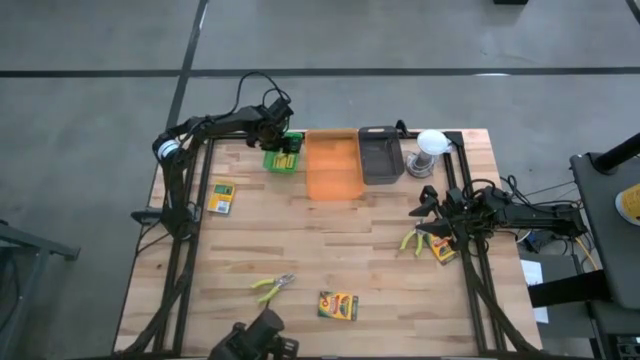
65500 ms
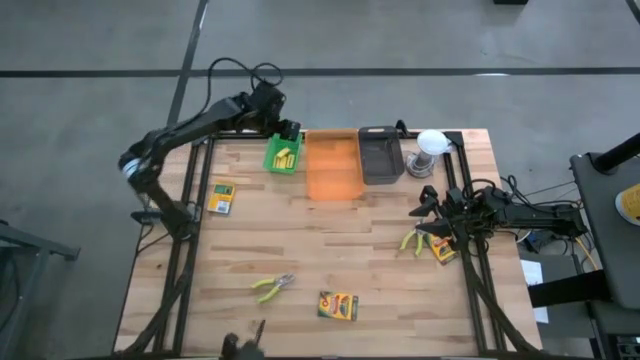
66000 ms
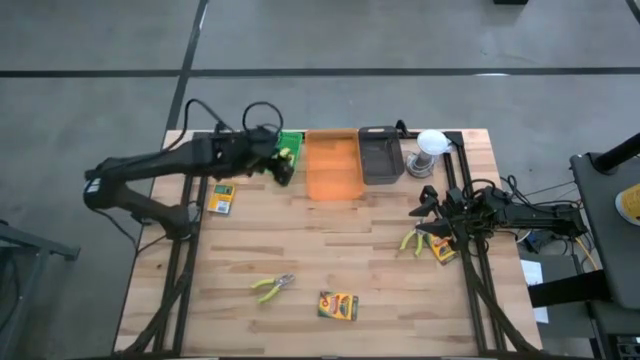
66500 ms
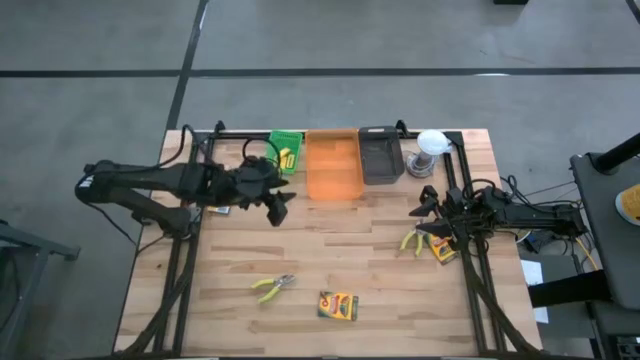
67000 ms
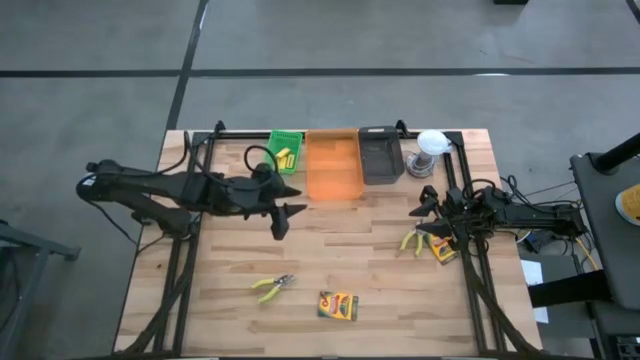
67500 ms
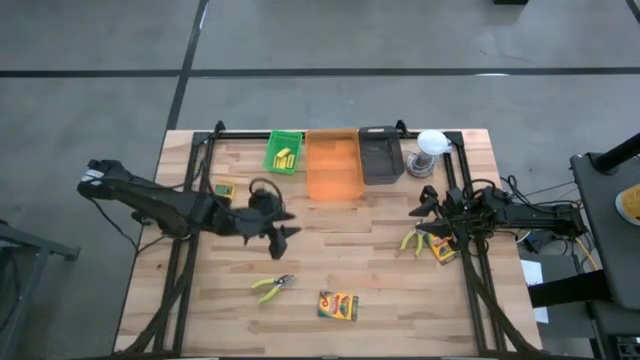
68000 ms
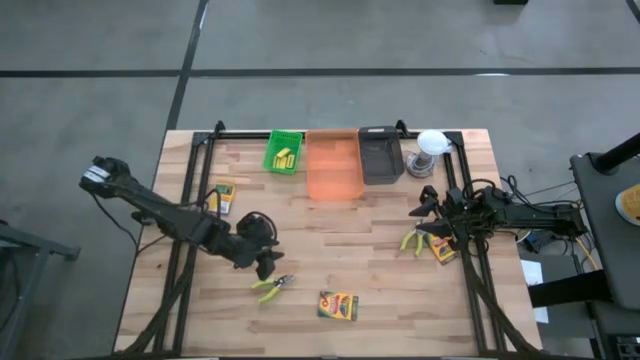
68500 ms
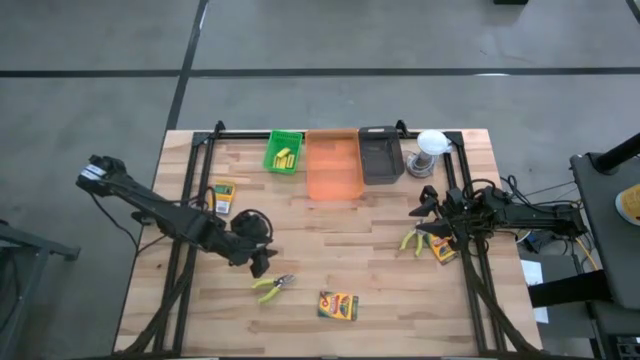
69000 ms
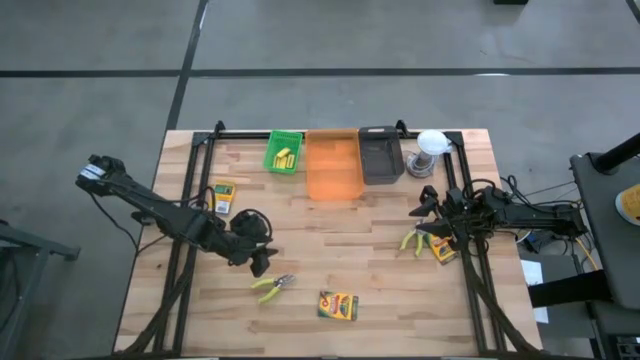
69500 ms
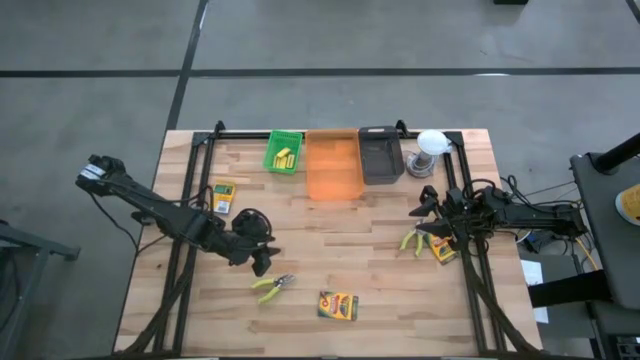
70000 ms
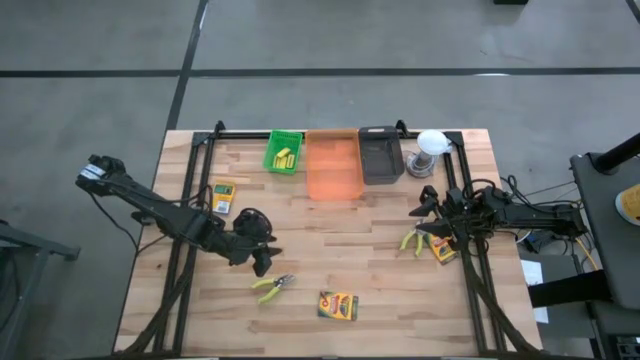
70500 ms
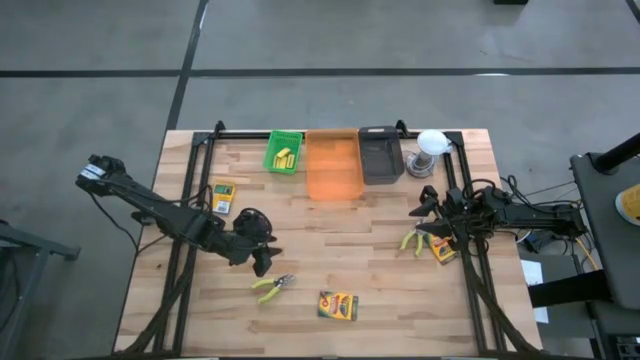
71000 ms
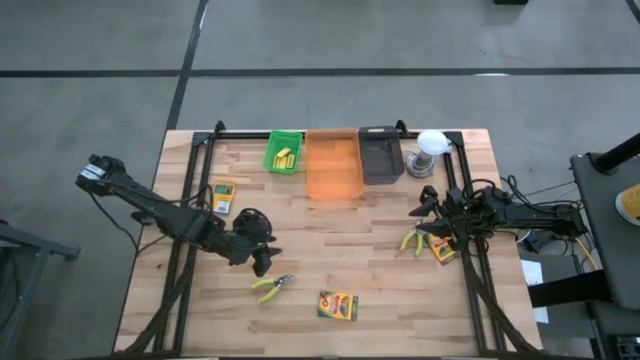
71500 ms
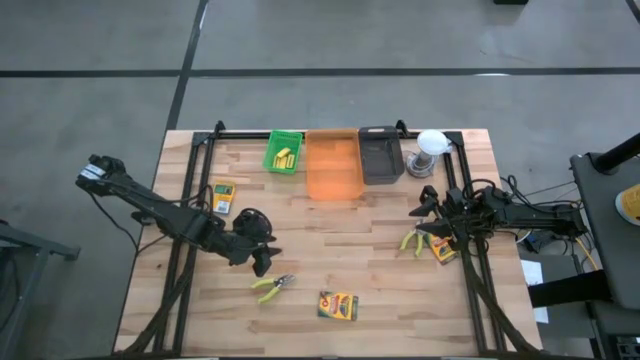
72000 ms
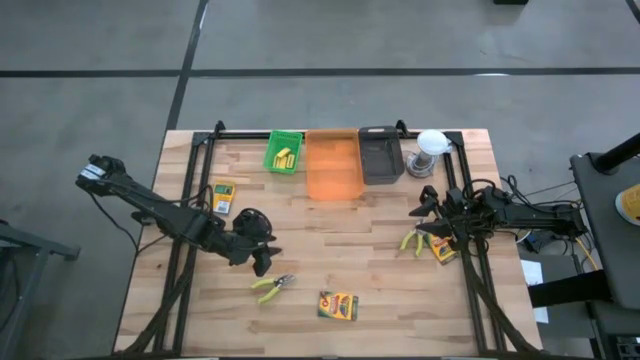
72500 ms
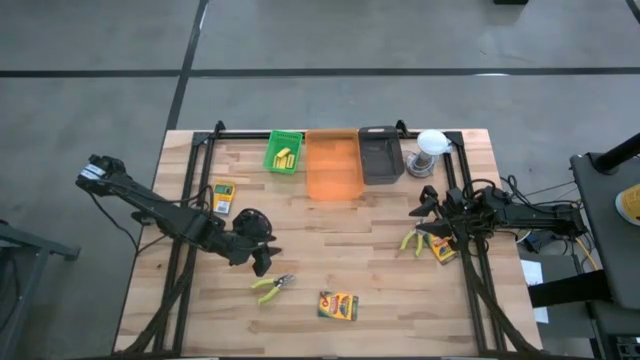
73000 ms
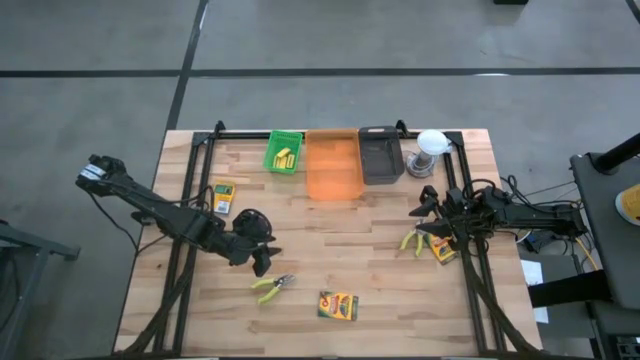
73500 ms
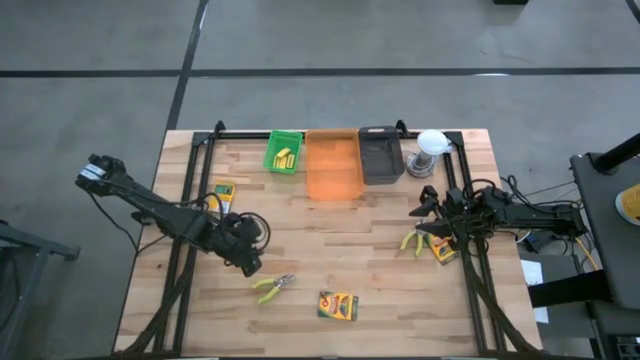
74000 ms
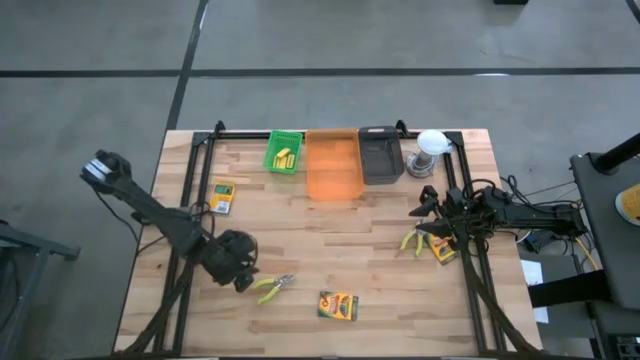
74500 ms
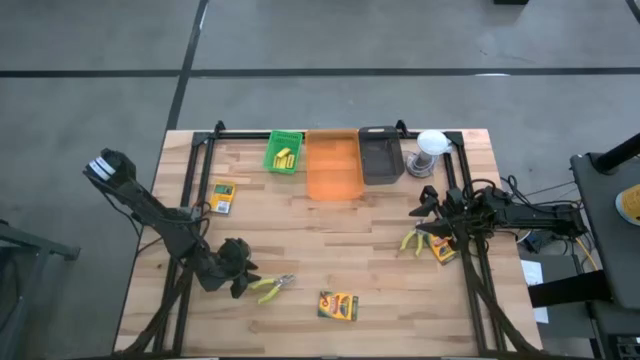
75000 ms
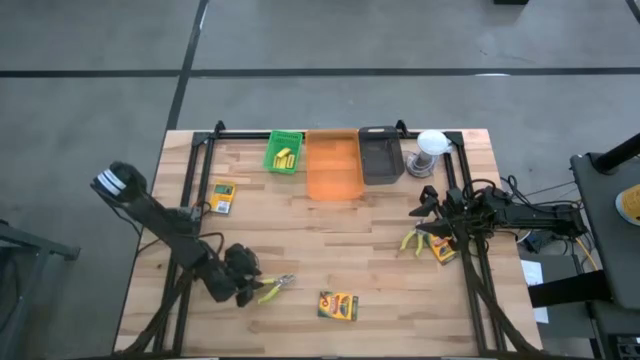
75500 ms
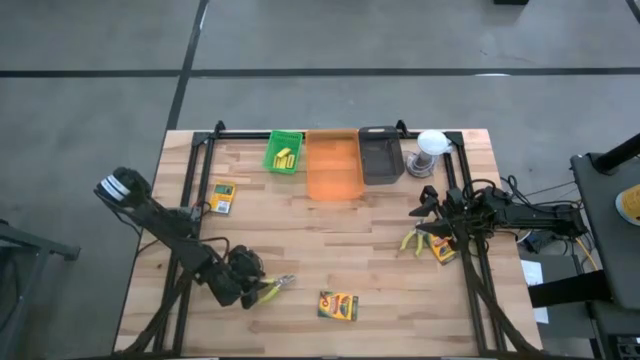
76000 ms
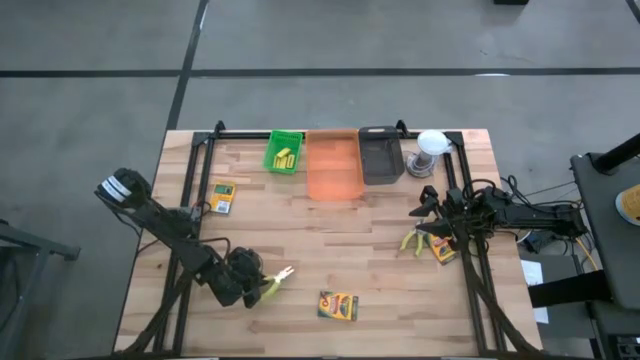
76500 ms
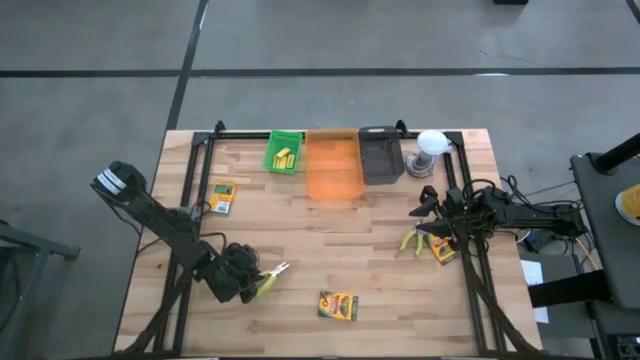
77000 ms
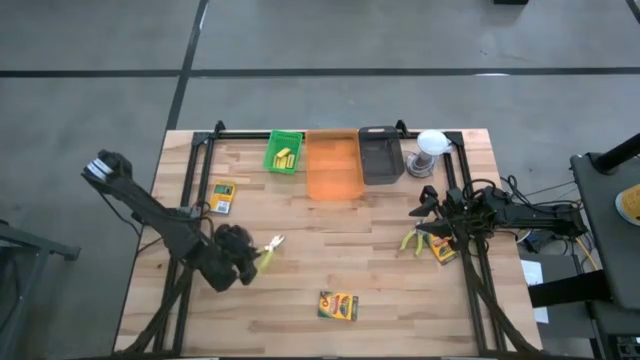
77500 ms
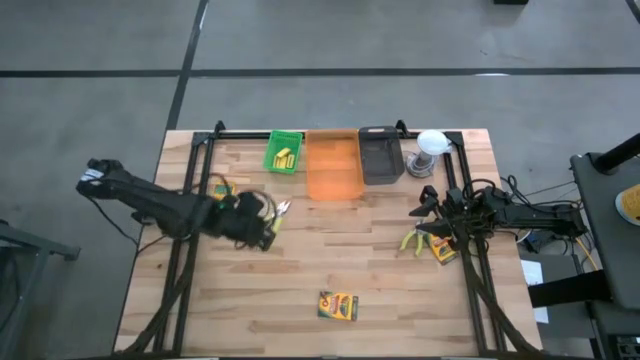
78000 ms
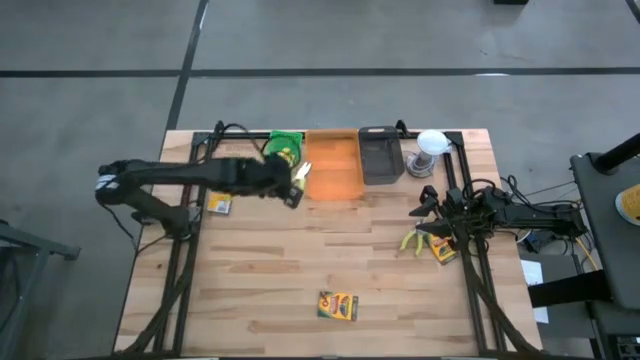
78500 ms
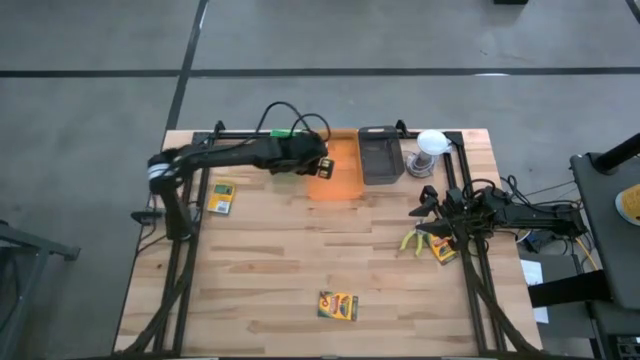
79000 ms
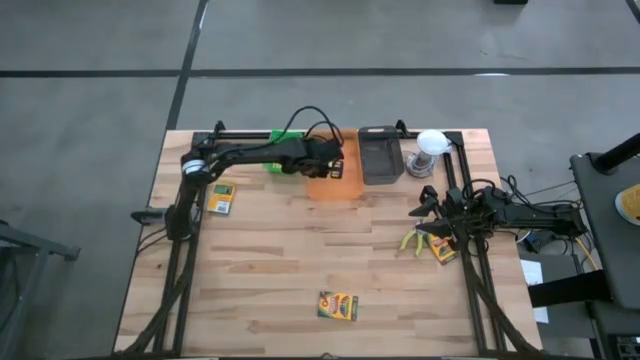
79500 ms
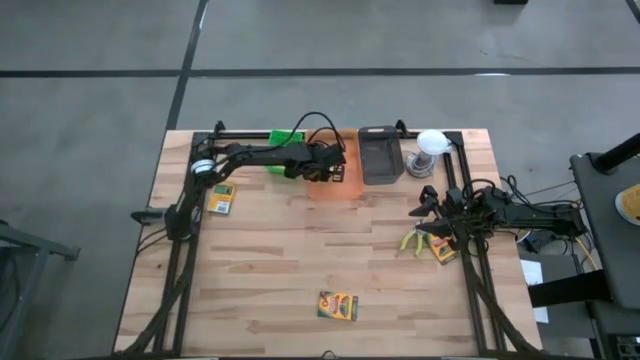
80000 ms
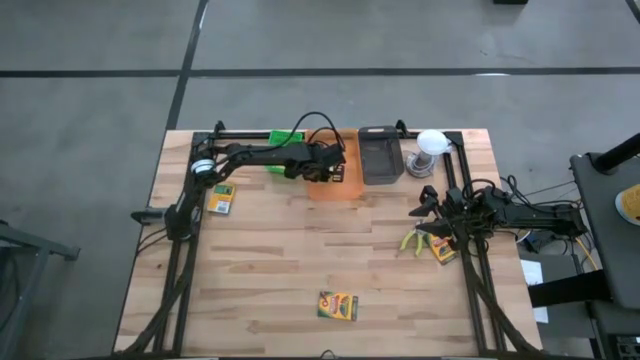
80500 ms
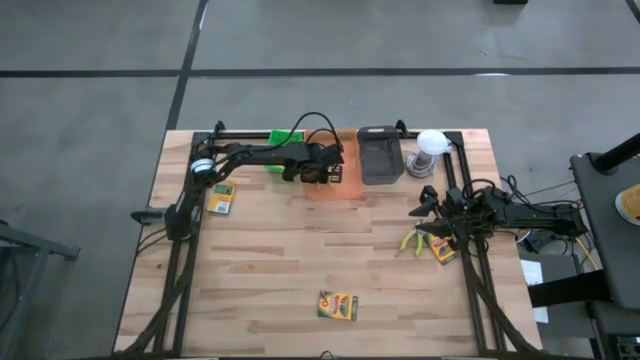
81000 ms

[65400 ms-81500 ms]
Task: Pick & Place School Supplies
Put the light green hole puncher into the orange bin

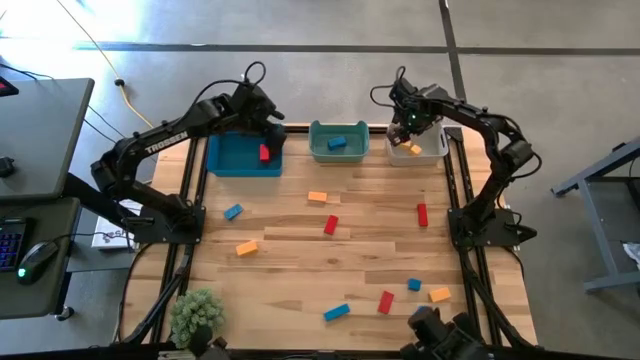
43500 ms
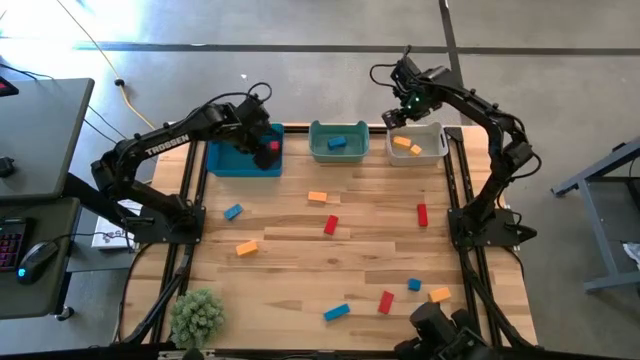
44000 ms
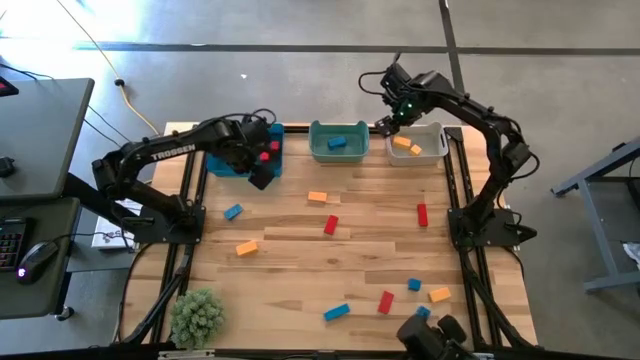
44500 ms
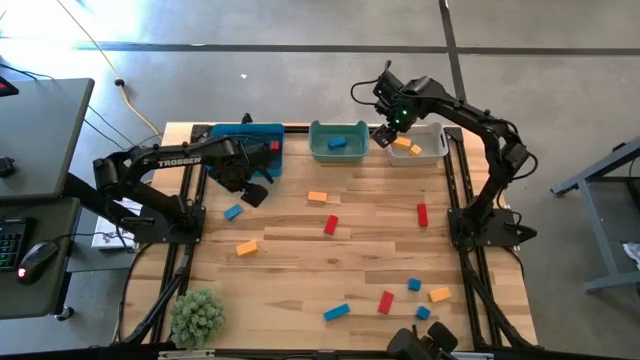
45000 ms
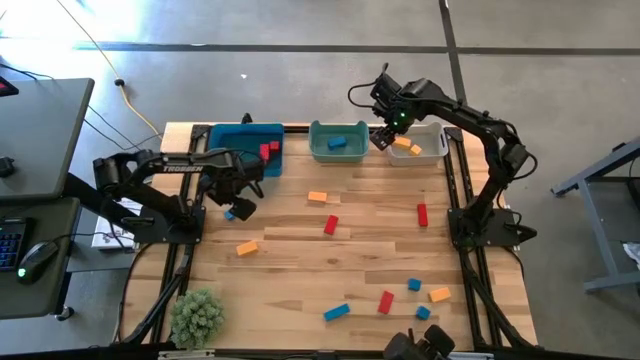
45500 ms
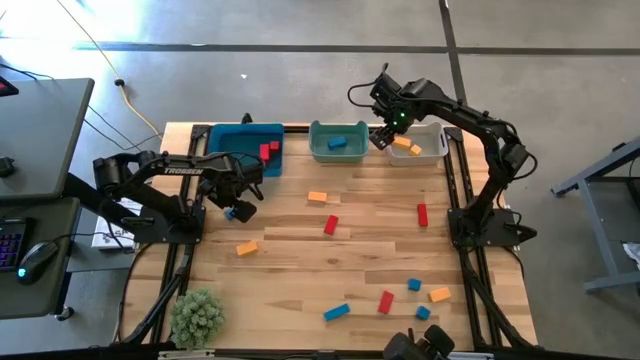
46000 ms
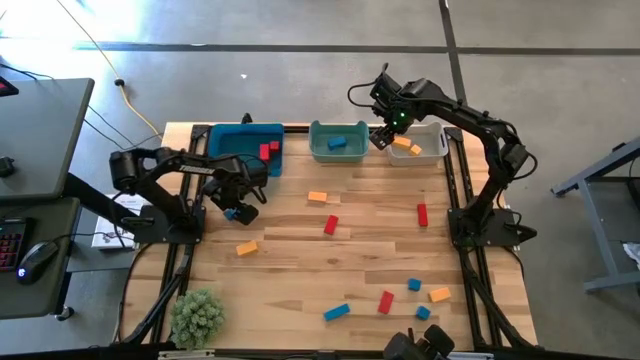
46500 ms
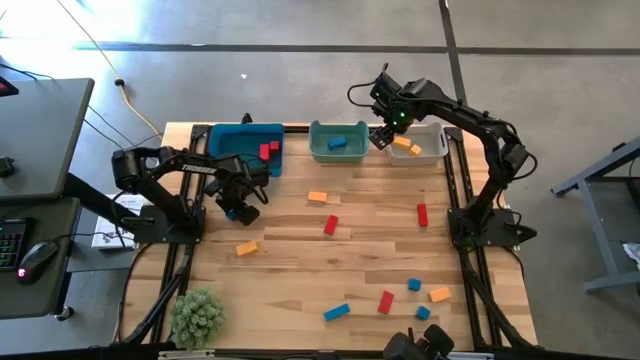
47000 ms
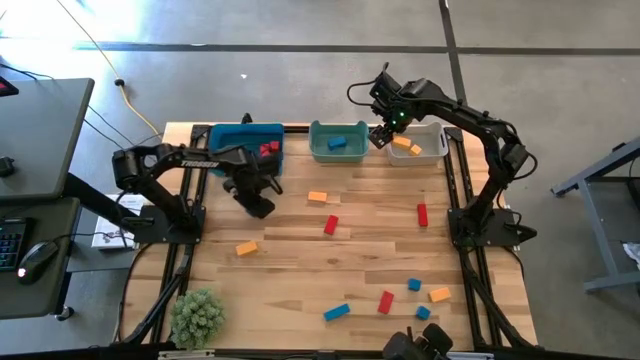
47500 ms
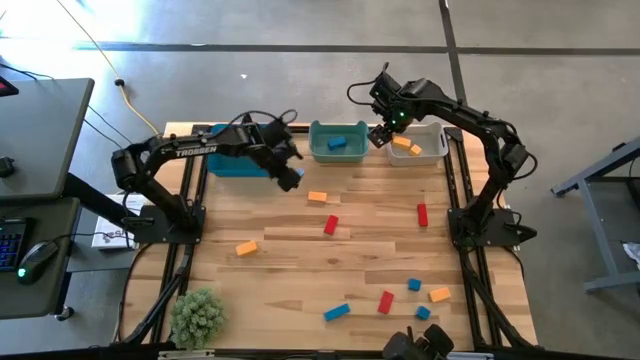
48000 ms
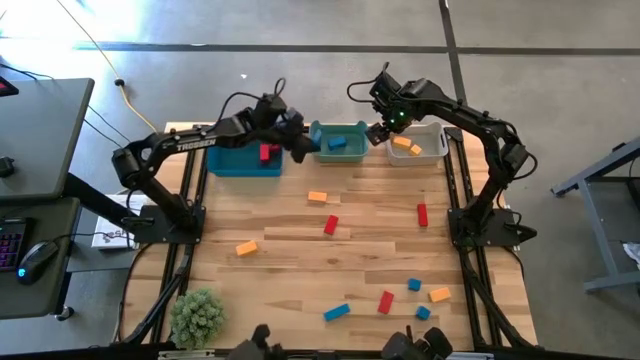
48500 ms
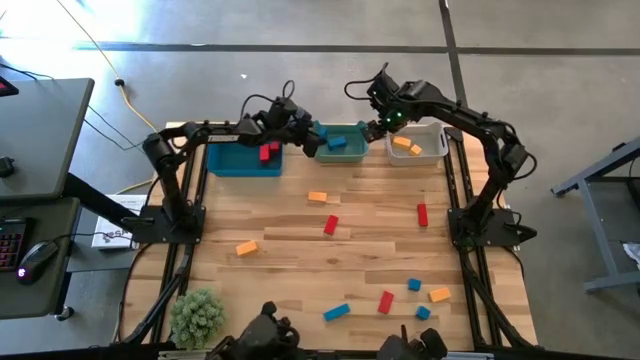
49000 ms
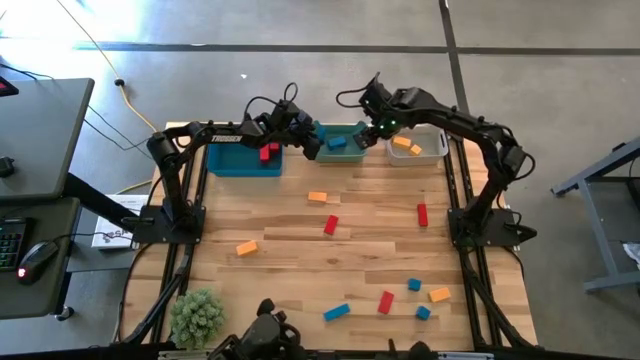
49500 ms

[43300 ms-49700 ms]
Task: Sort & place blocks by color
Put the blue block into the green bin
